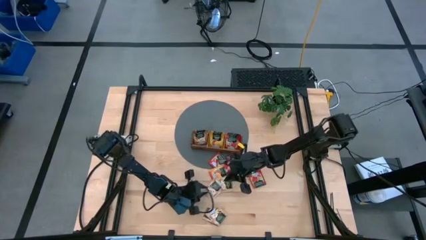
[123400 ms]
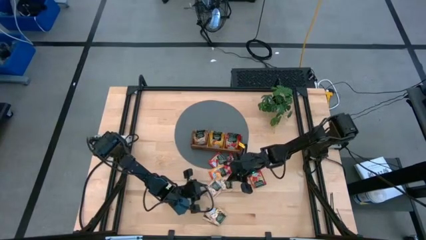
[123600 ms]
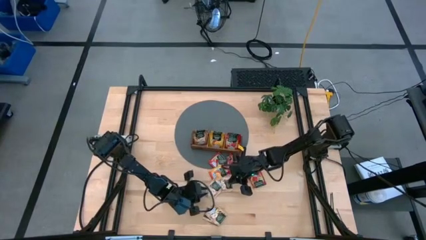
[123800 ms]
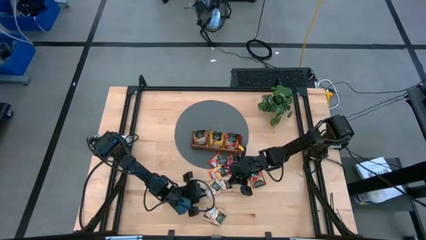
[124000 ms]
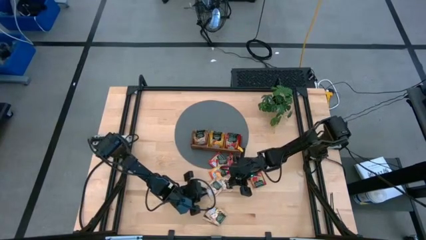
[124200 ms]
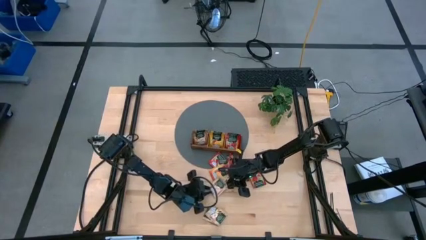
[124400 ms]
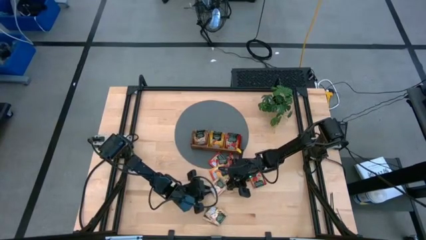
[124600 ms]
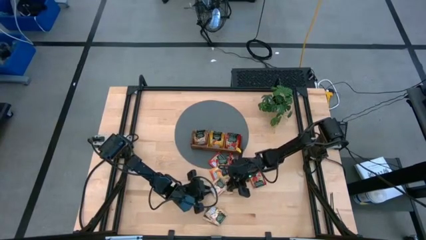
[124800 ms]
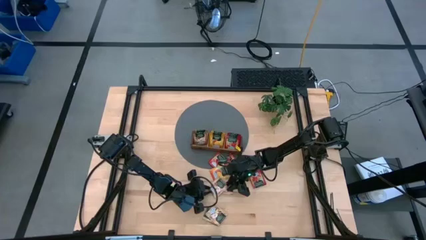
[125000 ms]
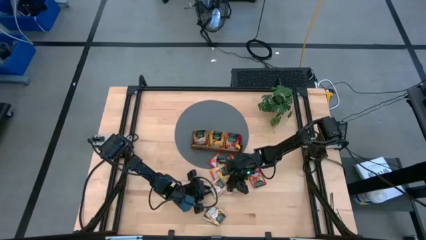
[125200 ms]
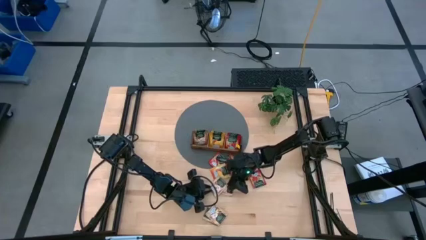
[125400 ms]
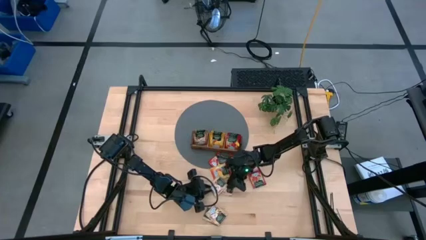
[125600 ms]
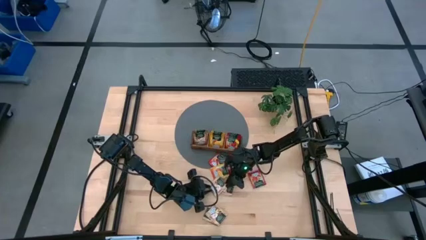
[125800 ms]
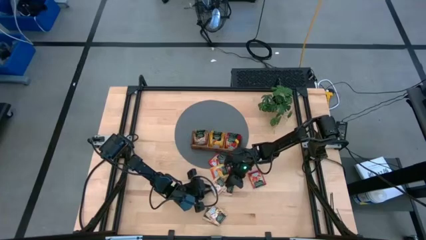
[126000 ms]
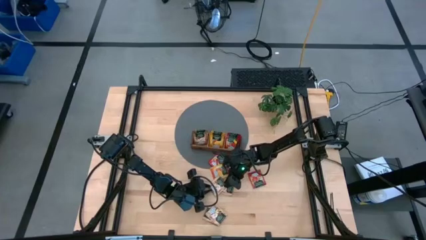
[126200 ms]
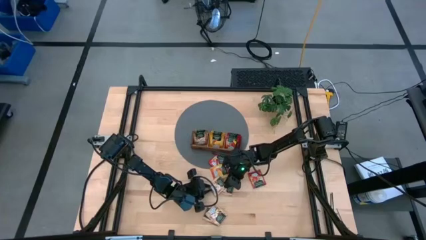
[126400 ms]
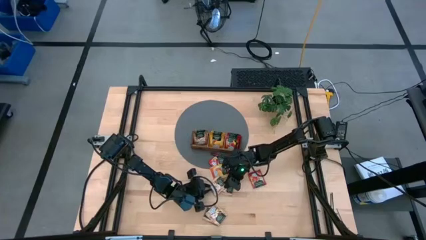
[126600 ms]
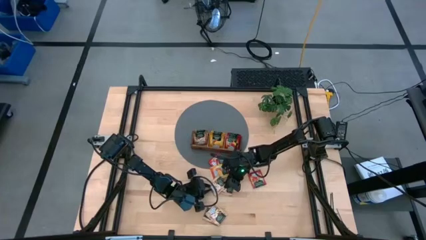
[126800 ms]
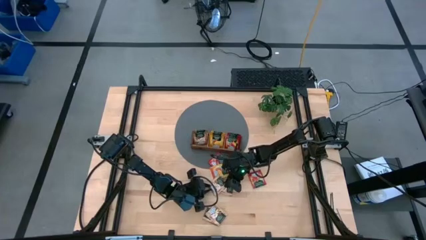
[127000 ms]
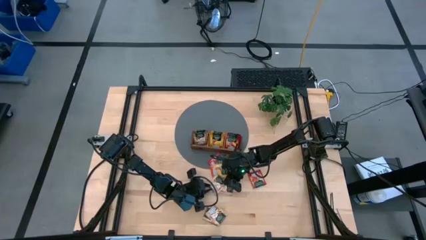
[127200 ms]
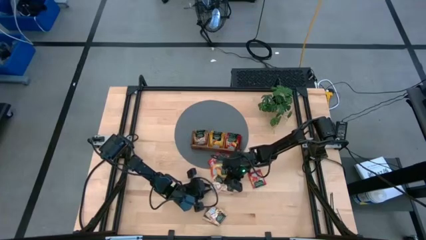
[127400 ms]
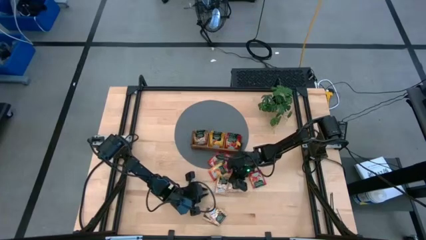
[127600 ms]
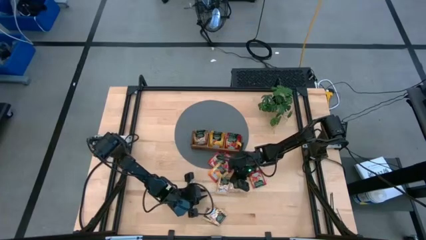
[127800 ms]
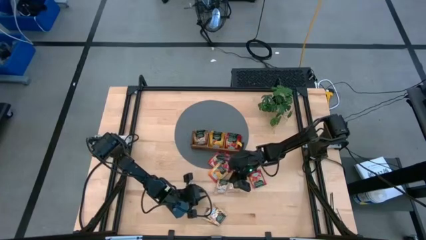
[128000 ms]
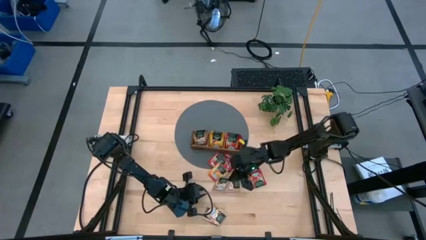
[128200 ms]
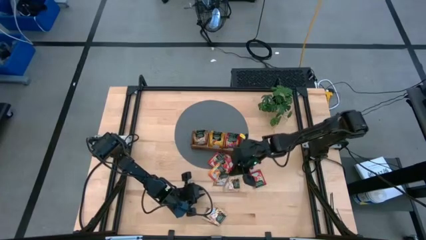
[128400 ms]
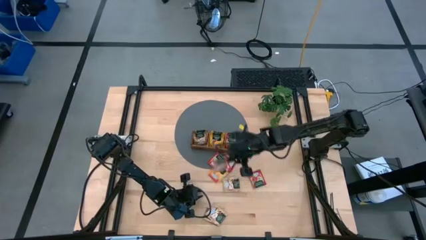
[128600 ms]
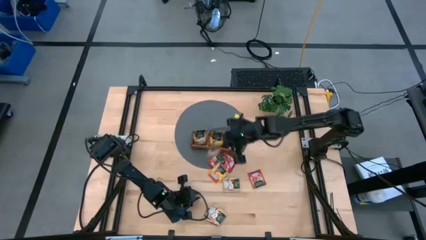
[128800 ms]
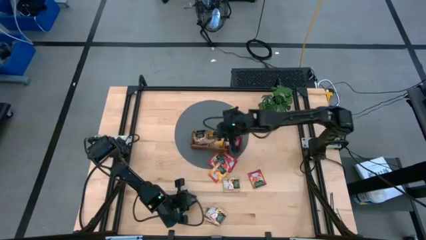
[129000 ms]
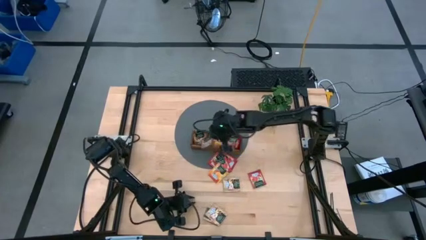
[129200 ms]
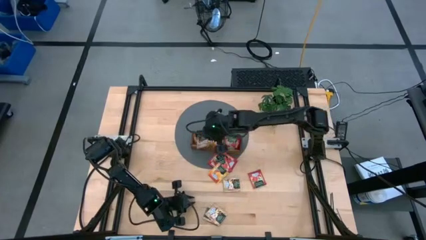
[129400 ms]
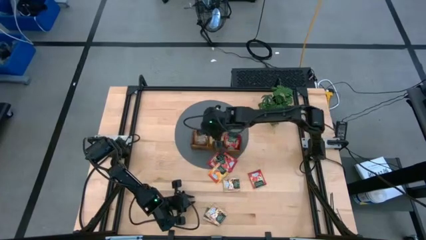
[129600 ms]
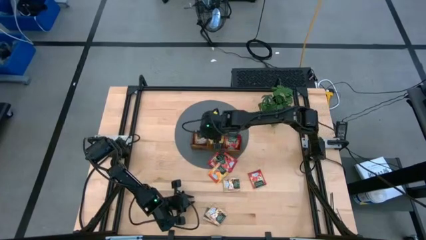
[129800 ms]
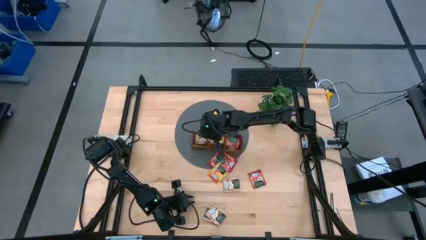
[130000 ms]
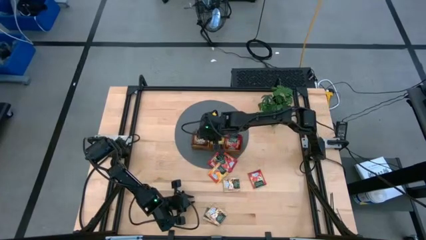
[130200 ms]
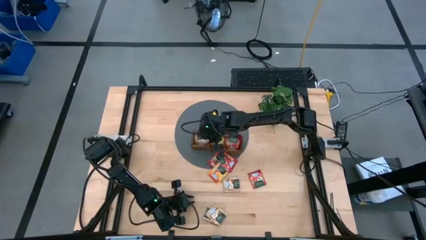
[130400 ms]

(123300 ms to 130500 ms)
Task: Pick & Place Tea
Put the brown tea bag into the left section of the wooden organizer

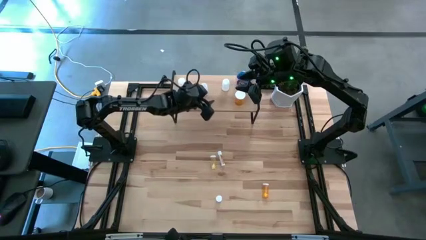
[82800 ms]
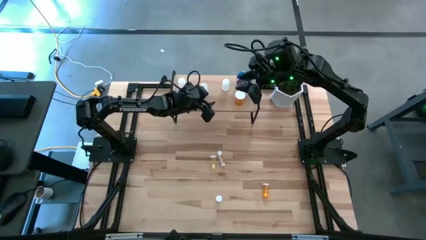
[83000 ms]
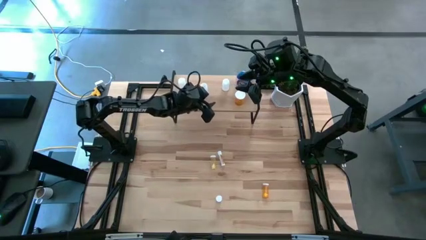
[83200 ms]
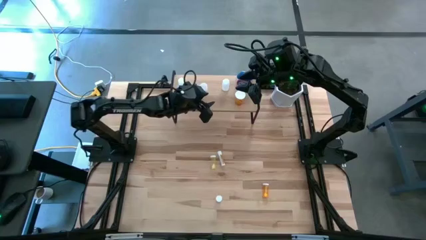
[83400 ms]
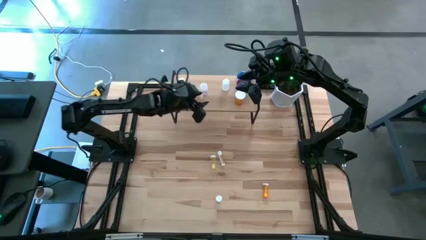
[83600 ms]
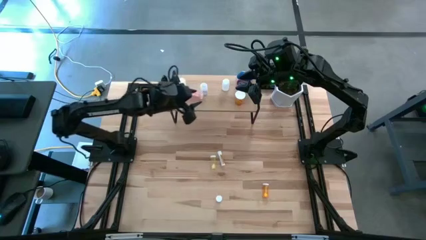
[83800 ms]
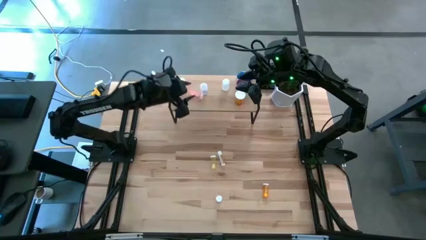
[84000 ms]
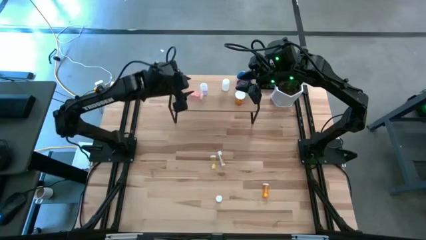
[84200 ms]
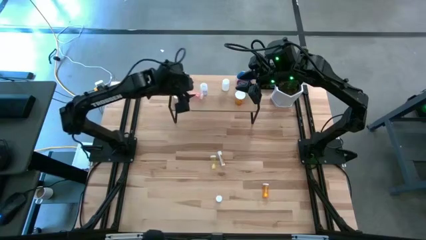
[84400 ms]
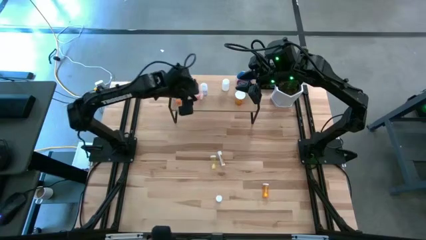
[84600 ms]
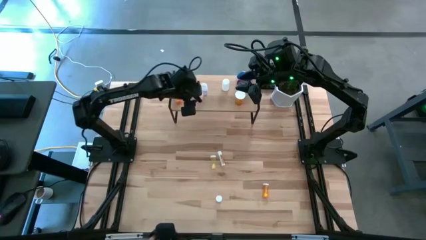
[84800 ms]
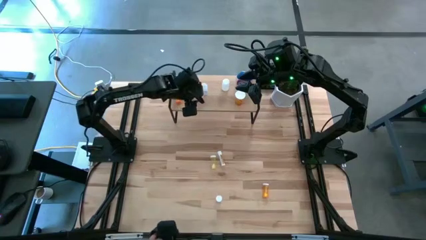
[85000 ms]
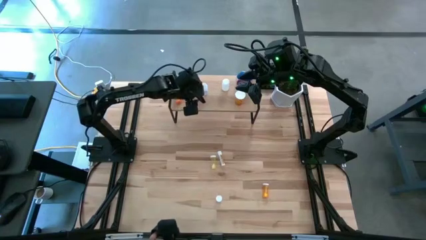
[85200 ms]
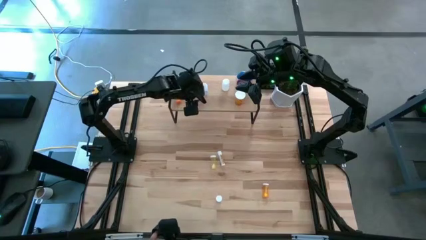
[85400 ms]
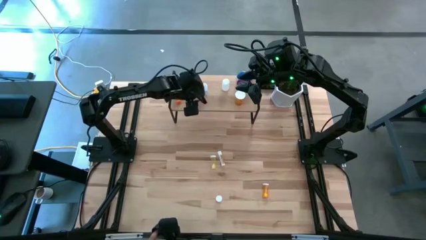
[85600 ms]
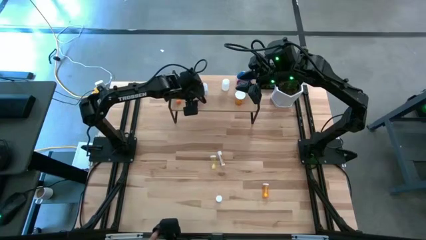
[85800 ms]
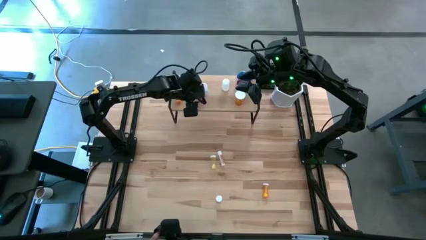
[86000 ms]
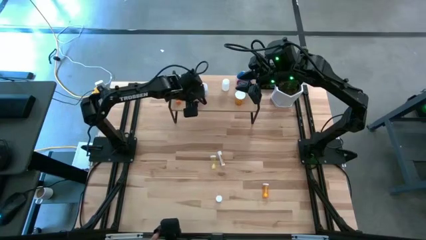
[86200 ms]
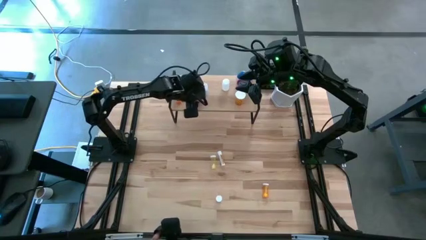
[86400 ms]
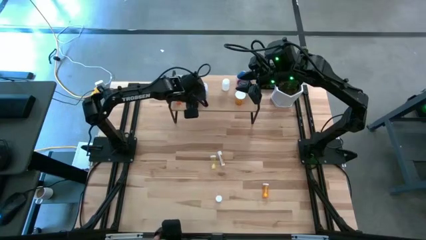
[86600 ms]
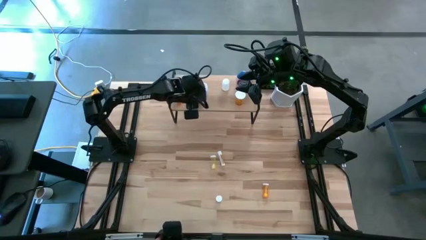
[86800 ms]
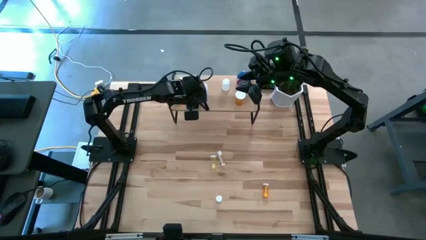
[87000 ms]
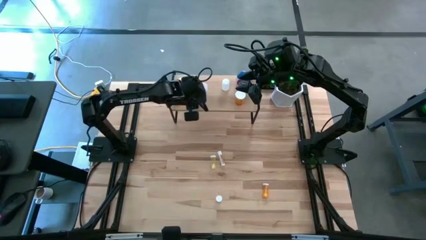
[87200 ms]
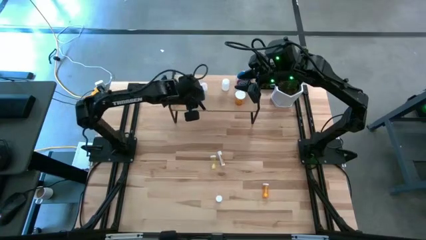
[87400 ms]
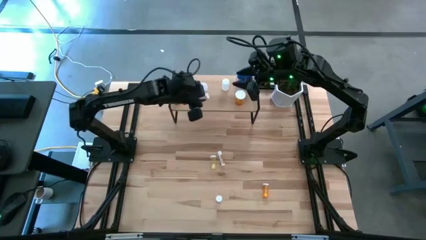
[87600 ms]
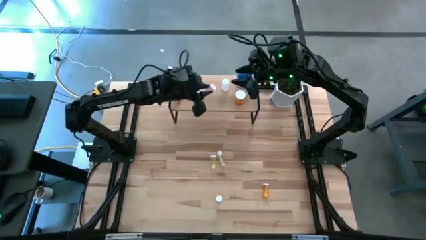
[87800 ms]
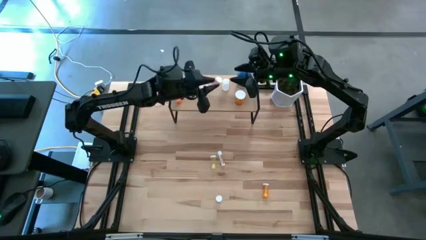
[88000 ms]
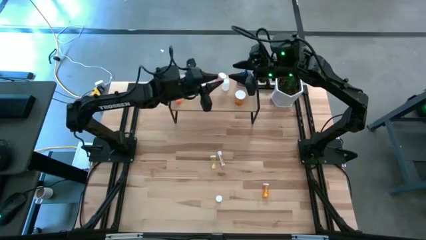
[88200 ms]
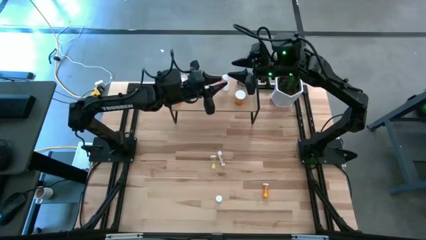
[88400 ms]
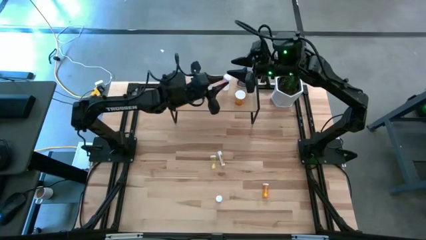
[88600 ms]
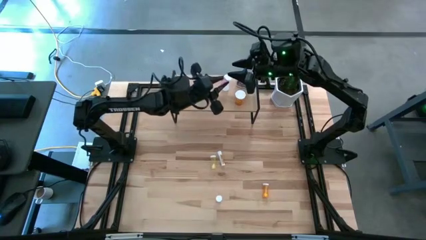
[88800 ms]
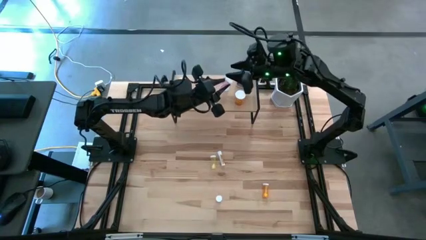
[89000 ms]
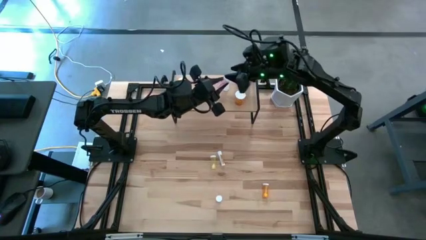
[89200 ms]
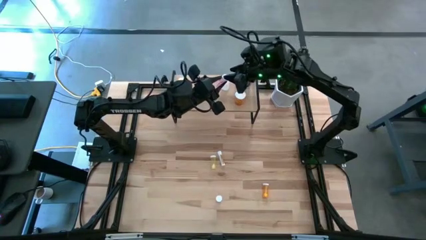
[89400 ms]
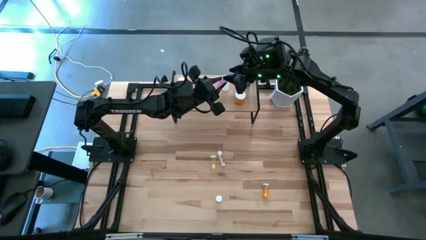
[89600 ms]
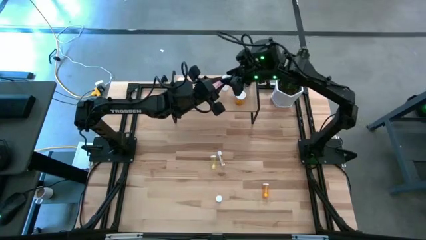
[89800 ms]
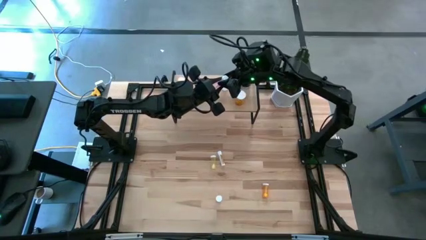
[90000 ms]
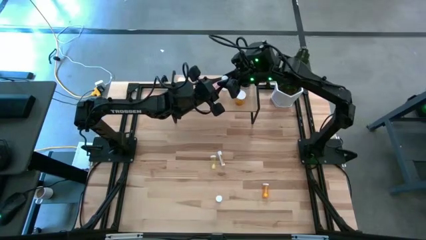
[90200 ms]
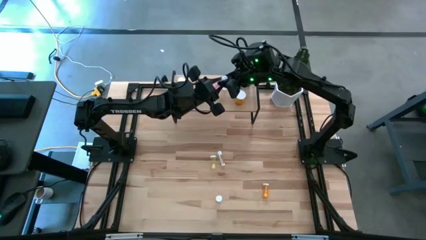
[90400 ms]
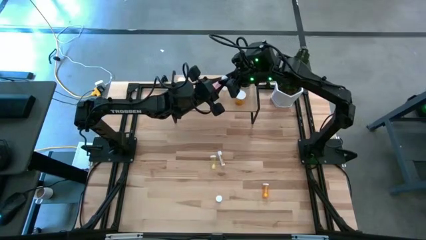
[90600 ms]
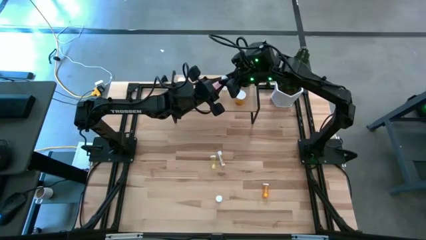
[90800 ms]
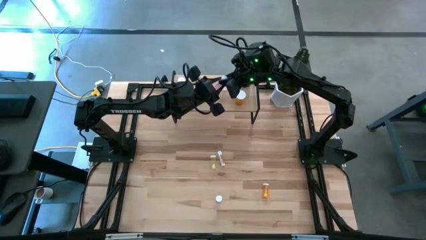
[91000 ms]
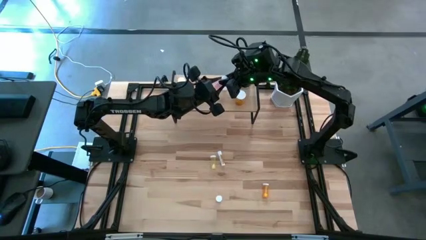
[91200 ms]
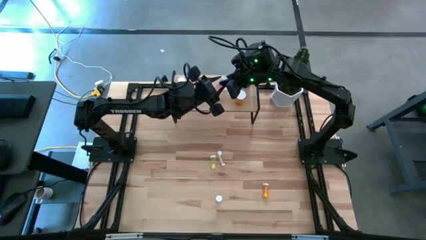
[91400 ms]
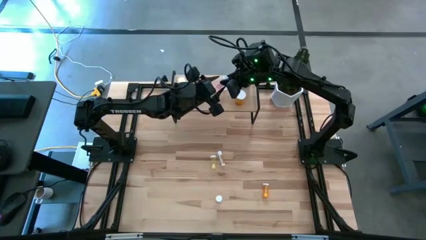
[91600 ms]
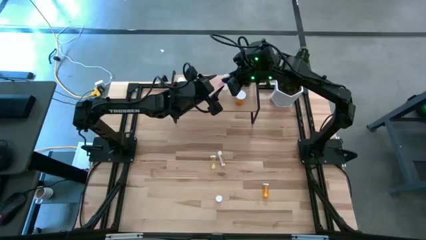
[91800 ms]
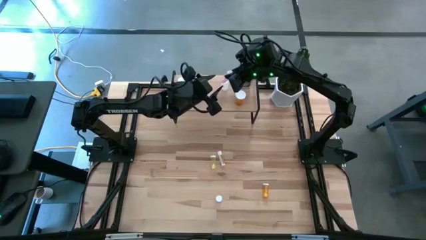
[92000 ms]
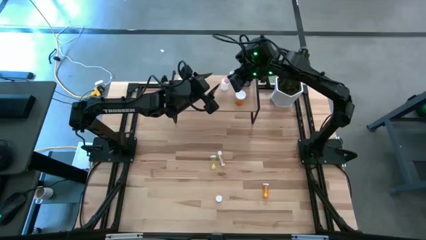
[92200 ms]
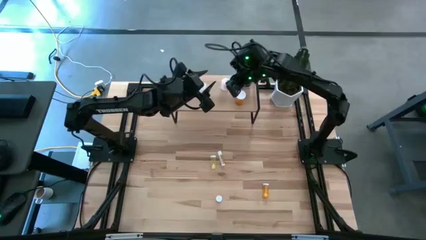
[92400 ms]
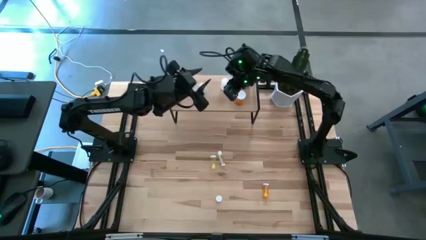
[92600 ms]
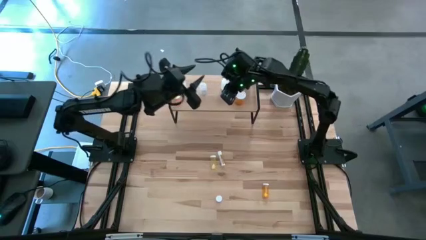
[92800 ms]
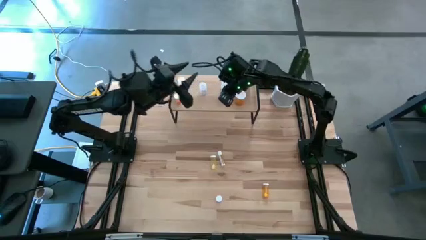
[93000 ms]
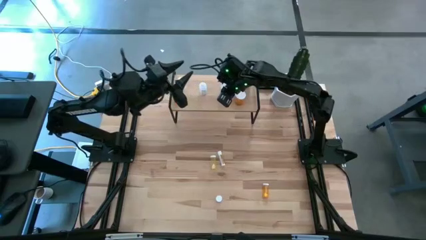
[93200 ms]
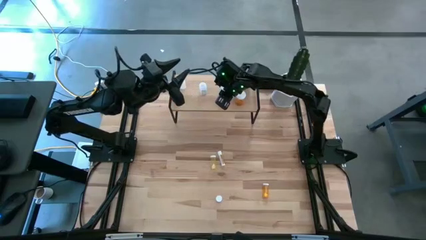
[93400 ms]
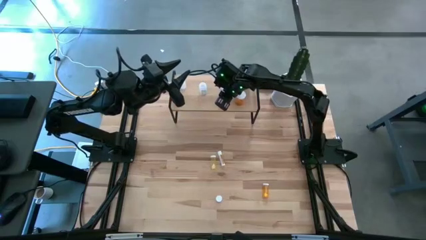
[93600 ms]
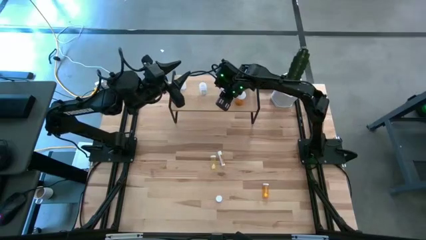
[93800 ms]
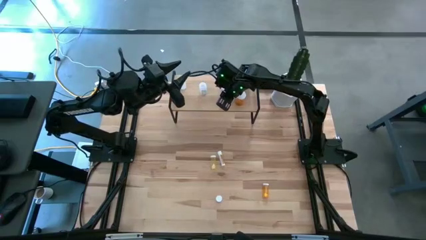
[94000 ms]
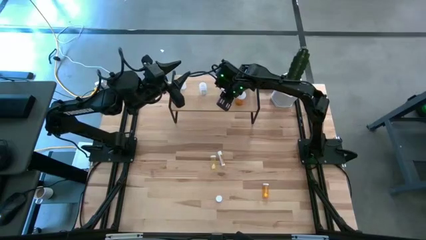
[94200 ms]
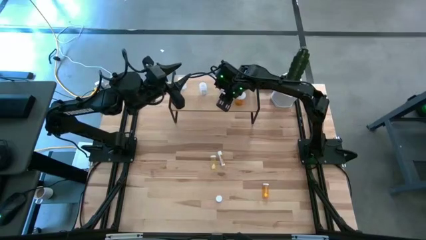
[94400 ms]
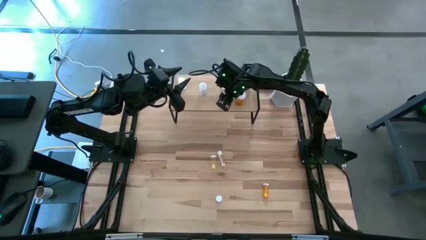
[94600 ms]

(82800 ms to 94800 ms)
Task: Pick and place medicine bottles onto shelf by color
Adjust the pink pill bottle on the shelf
